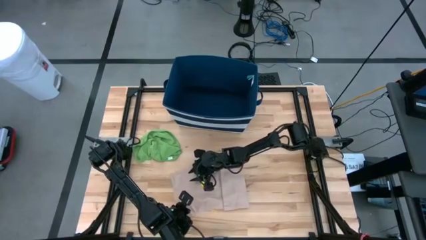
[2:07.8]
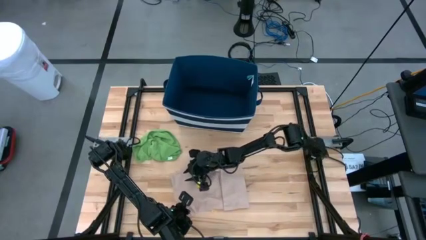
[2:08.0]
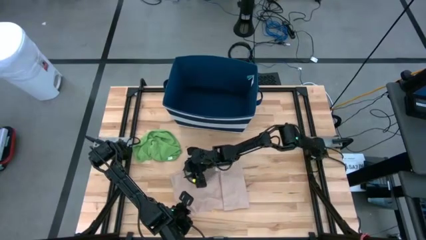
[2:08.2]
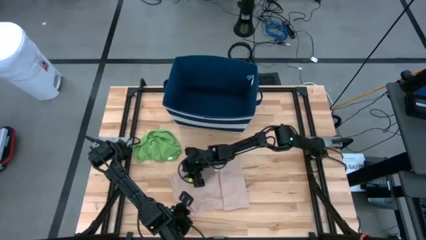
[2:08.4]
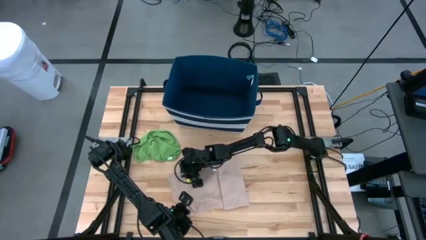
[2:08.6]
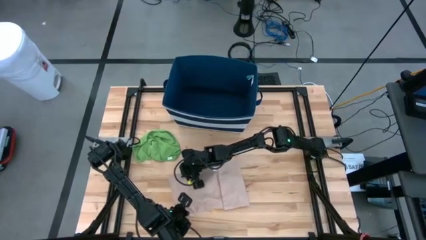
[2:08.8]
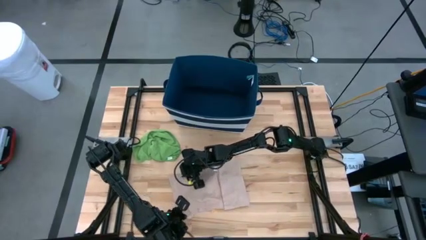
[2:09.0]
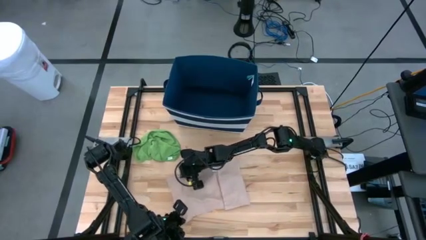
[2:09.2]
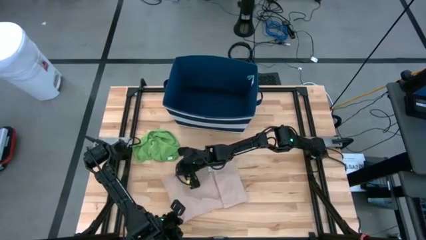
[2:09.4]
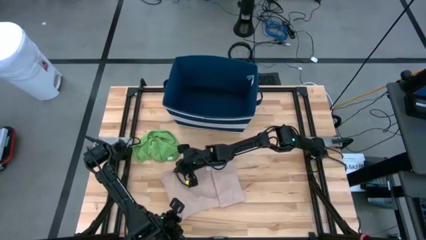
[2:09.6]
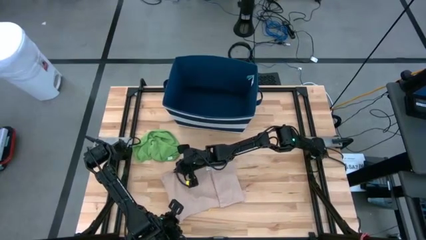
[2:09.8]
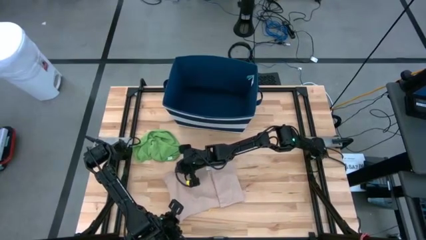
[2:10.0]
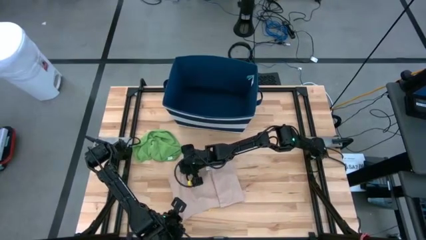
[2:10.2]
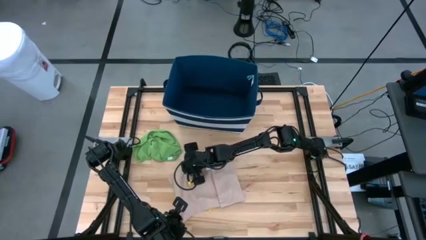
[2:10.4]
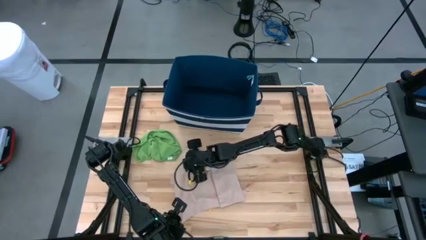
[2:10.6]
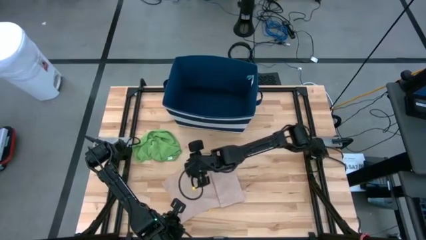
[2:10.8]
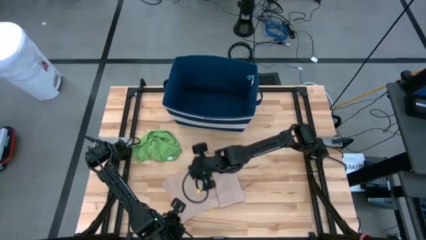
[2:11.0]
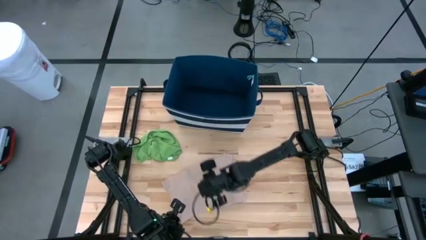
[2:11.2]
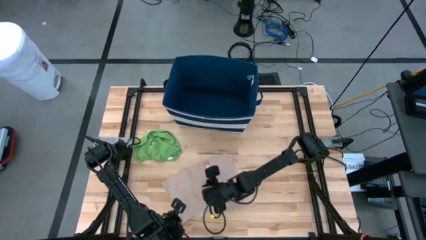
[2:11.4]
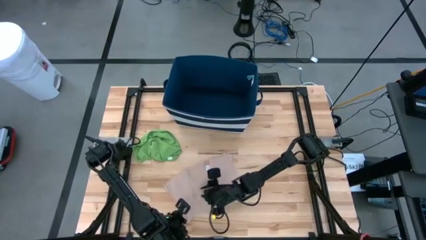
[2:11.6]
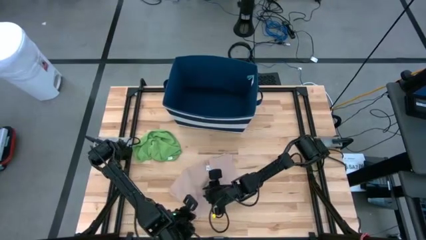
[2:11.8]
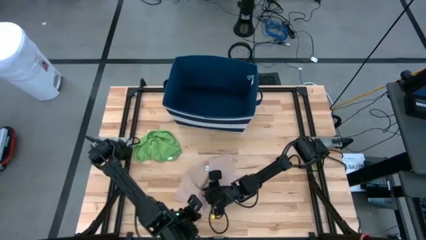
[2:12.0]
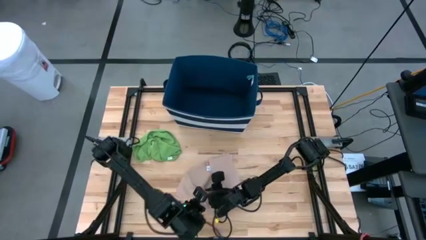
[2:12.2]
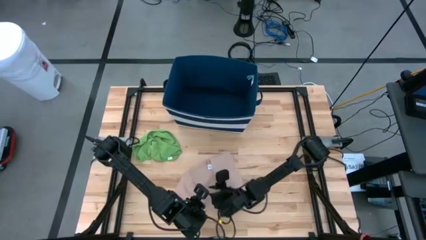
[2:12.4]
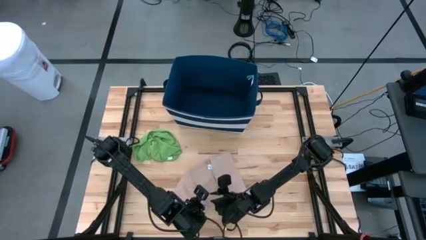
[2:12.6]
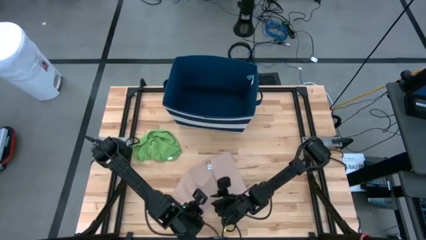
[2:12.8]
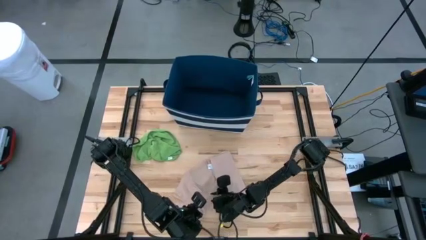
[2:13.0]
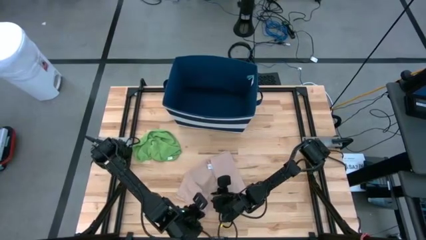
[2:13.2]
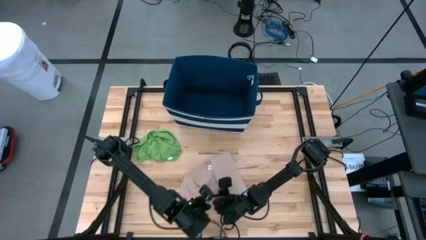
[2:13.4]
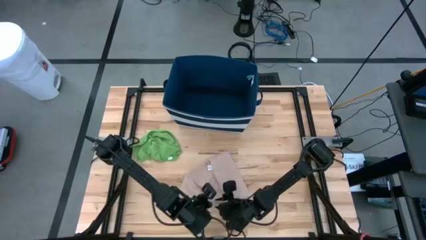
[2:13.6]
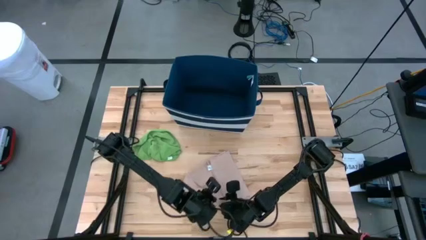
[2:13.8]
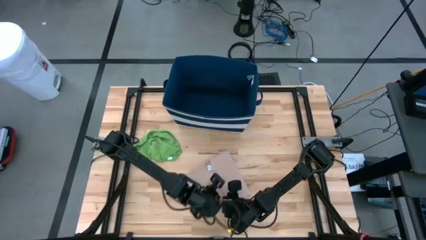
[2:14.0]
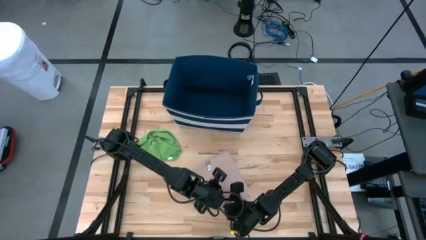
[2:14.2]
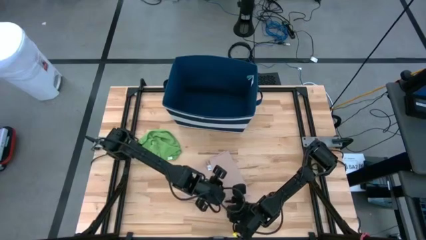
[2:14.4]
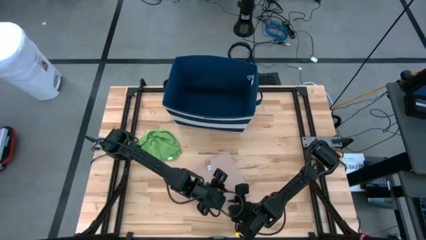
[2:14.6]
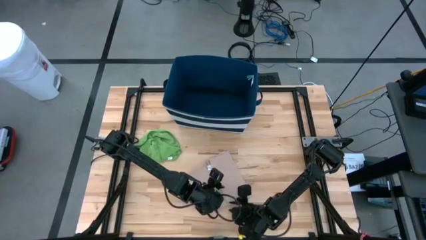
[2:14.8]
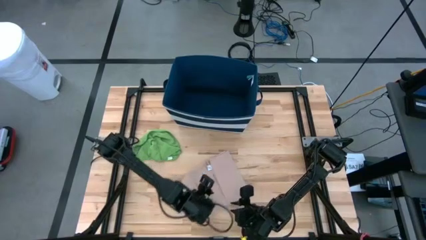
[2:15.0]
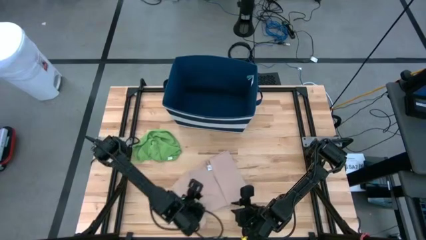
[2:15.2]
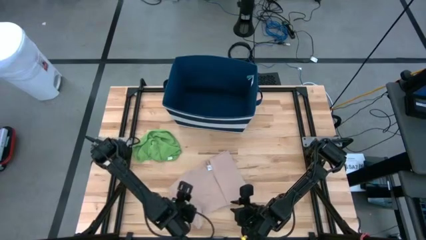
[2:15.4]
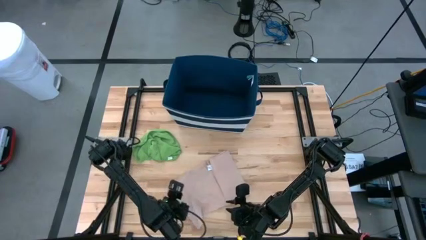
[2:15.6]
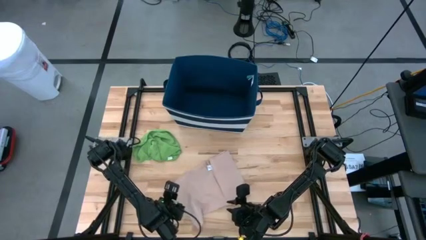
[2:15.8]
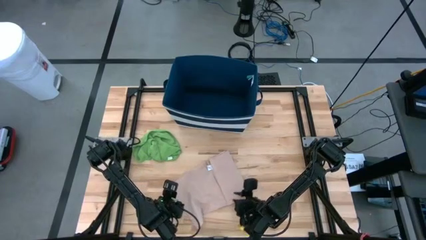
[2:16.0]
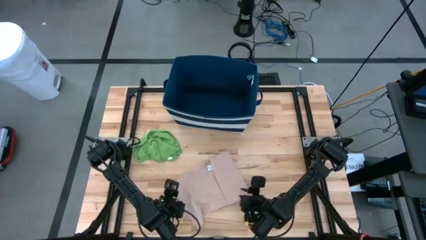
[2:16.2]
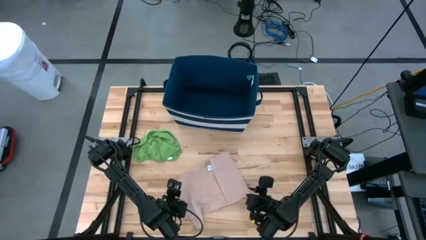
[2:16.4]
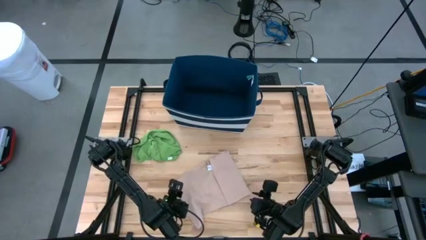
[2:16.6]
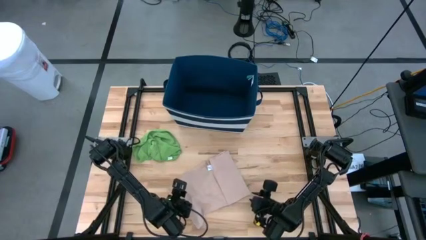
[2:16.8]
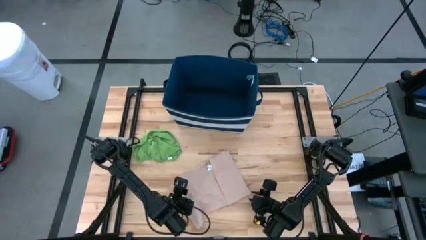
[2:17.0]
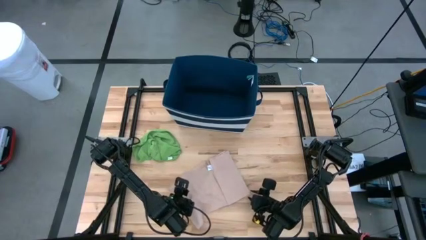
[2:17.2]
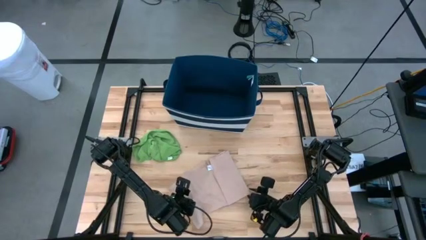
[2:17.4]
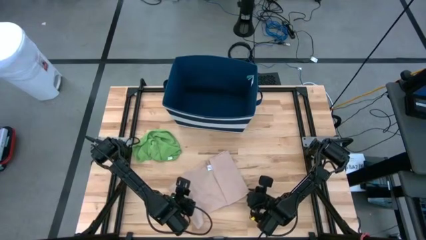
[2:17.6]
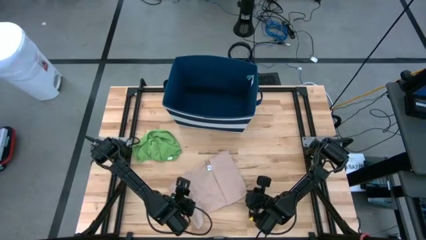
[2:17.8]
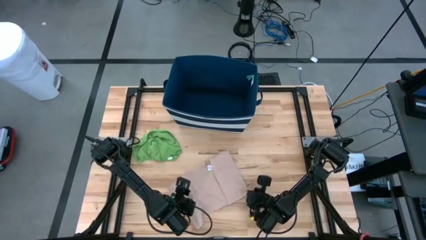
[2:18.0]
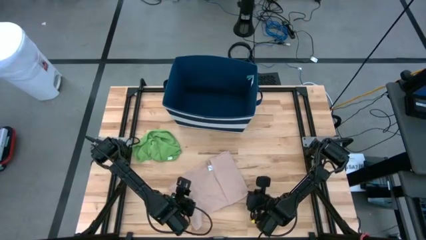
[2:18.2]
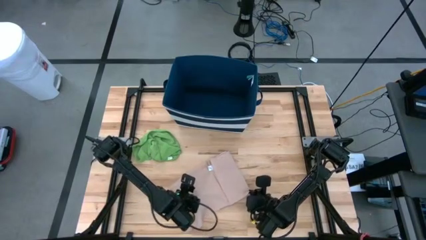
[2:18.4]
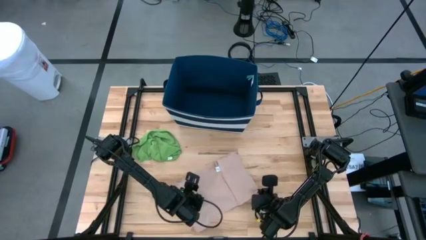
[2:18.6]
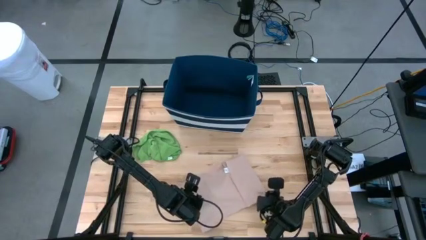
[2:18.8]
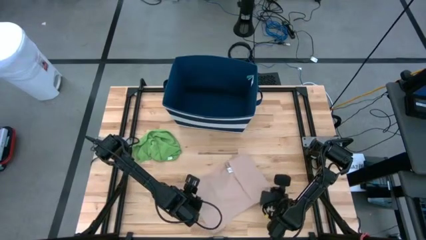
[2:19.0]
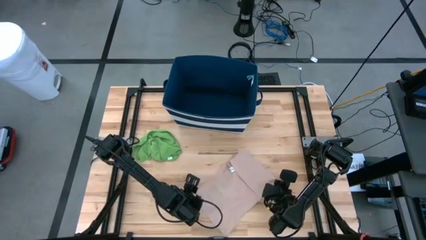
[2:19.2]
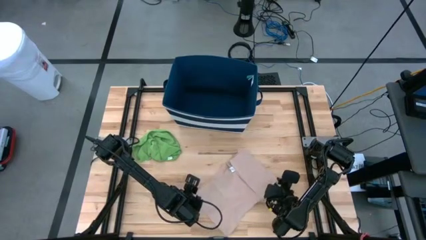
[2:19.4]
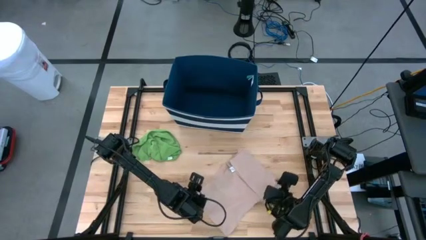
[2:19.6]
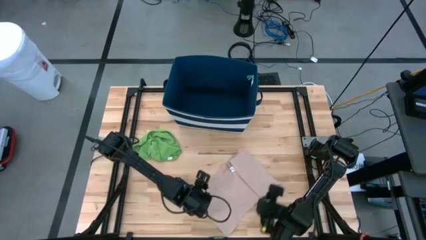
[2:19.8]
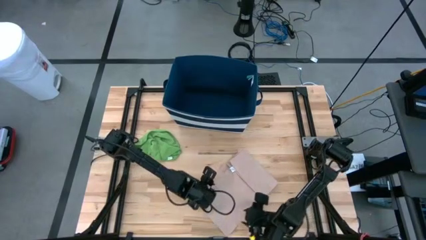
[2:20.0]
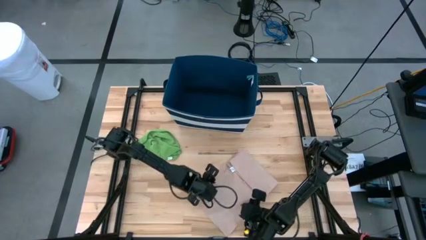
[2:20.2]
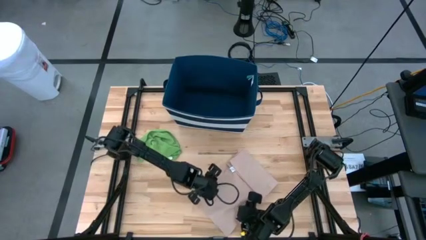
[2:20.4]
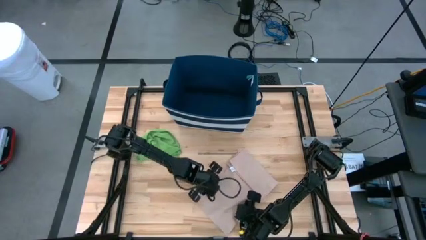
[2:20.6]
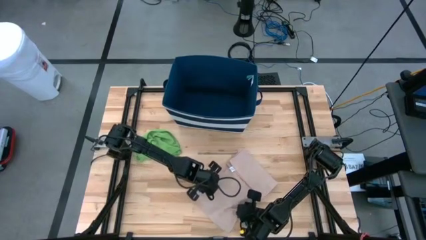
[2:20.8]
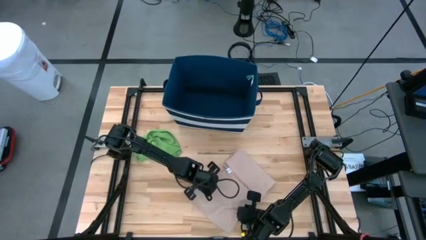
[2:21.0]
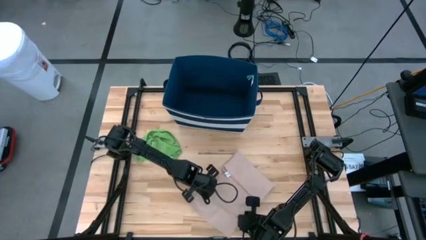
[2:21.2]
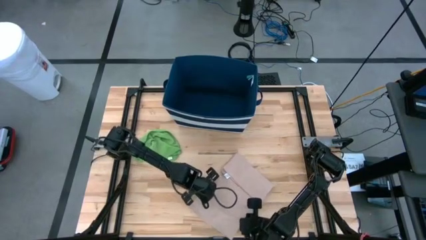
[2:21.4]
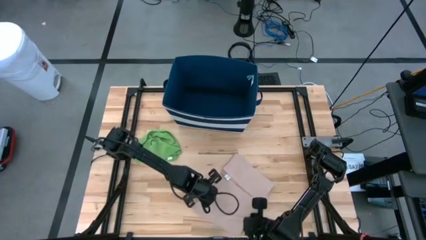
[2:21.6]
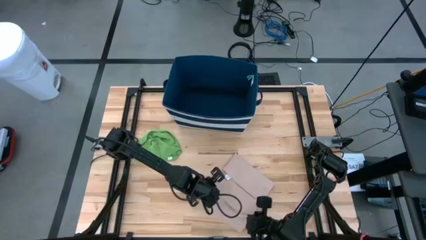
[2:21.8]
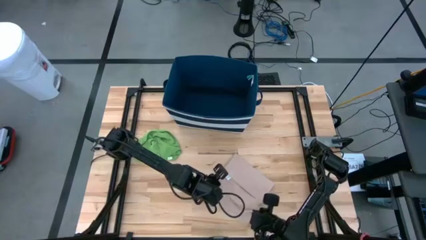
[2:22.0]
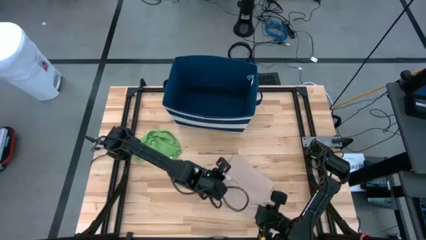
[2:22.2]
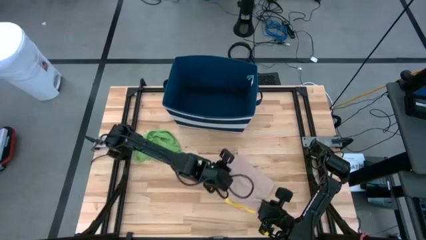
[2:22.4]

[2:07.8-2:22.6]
Task: Fold towel
Fold the brown towel
